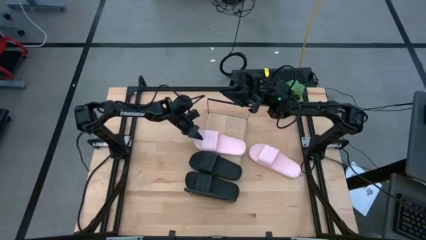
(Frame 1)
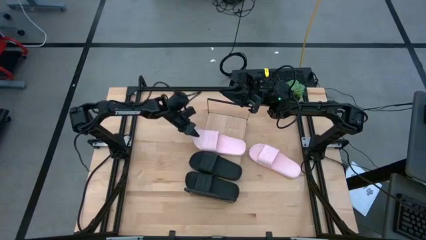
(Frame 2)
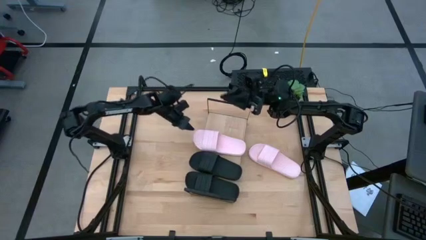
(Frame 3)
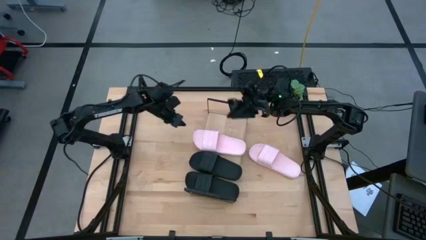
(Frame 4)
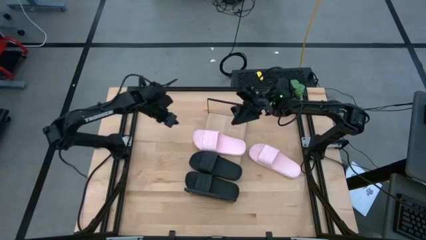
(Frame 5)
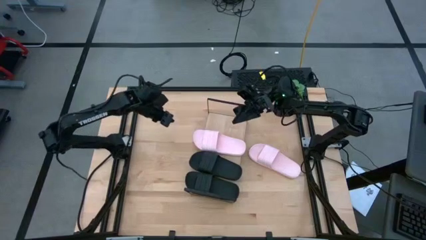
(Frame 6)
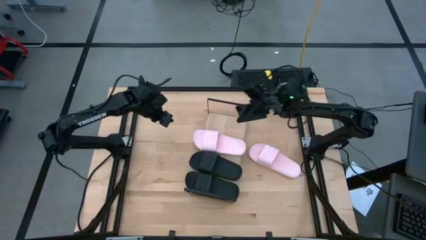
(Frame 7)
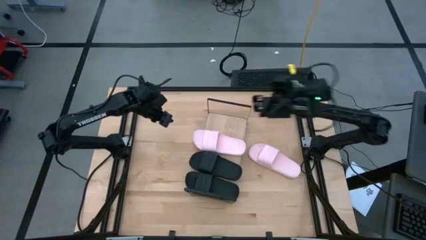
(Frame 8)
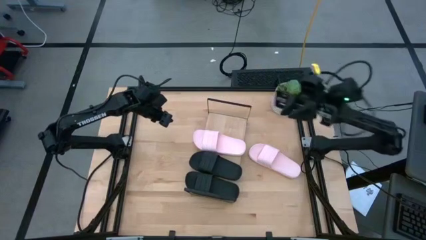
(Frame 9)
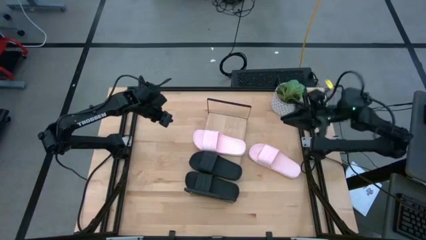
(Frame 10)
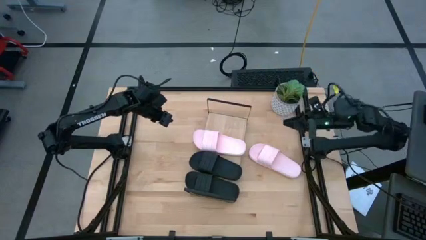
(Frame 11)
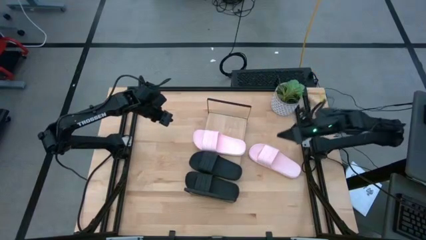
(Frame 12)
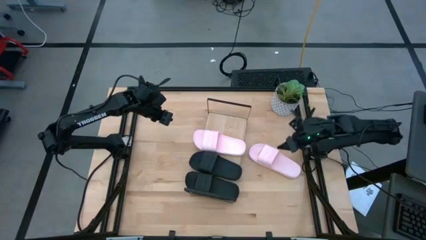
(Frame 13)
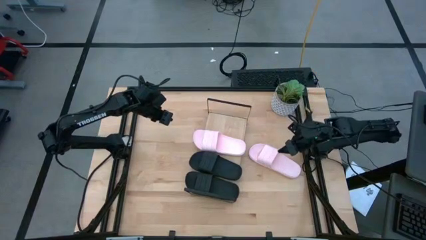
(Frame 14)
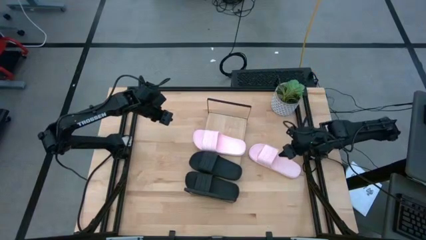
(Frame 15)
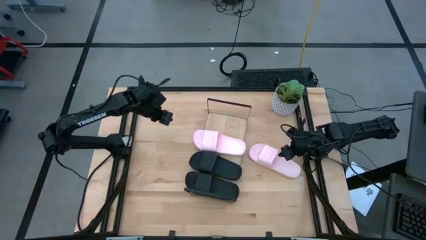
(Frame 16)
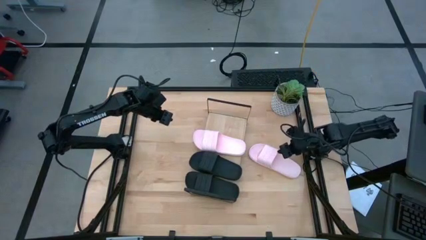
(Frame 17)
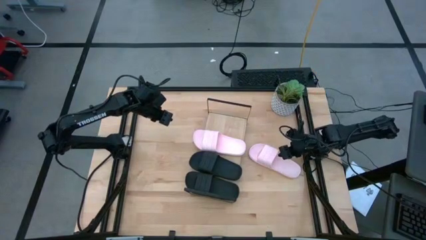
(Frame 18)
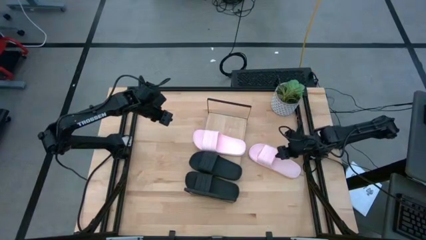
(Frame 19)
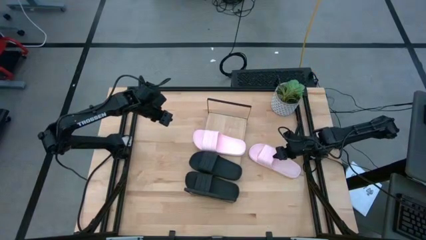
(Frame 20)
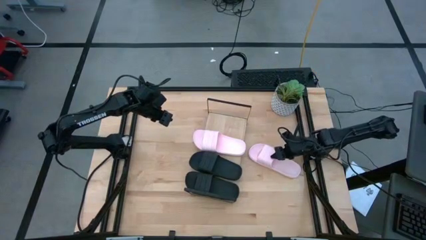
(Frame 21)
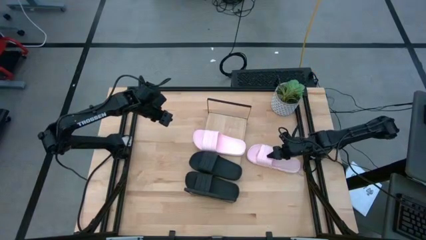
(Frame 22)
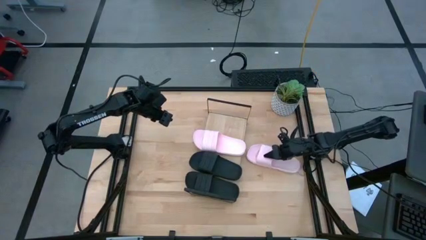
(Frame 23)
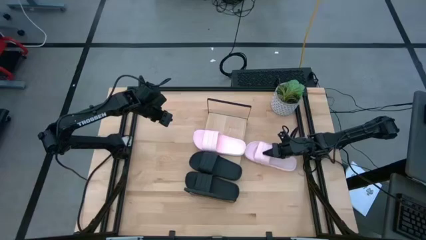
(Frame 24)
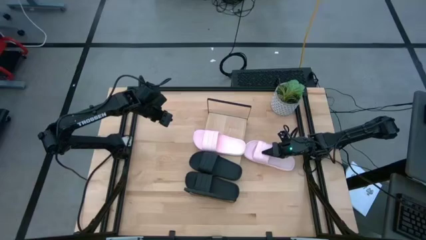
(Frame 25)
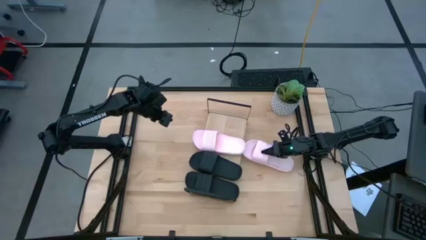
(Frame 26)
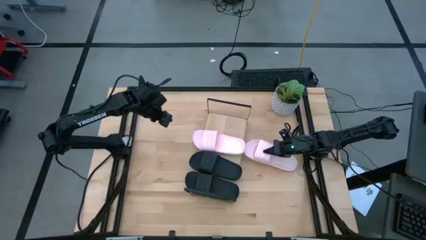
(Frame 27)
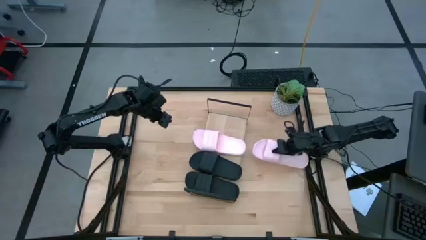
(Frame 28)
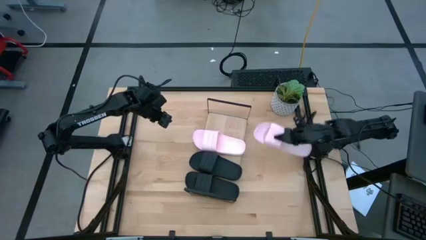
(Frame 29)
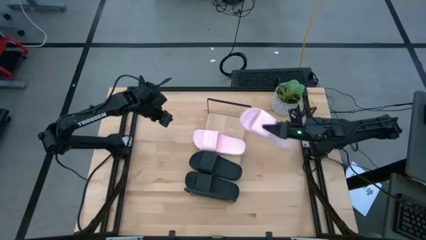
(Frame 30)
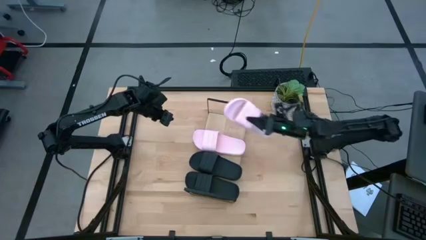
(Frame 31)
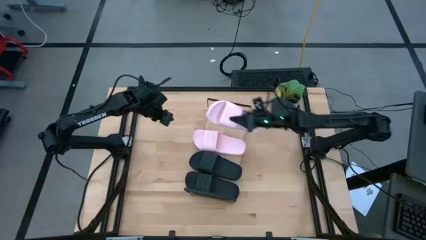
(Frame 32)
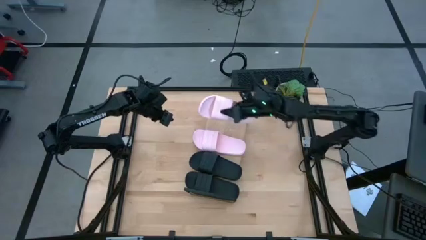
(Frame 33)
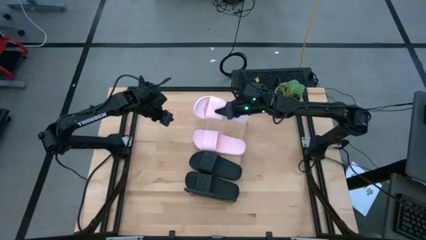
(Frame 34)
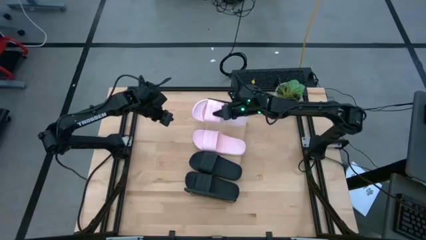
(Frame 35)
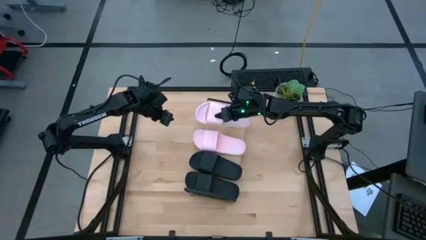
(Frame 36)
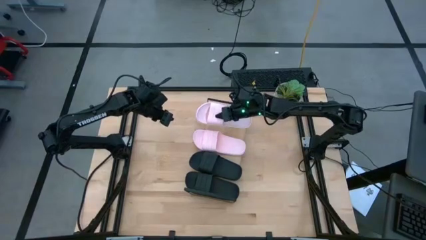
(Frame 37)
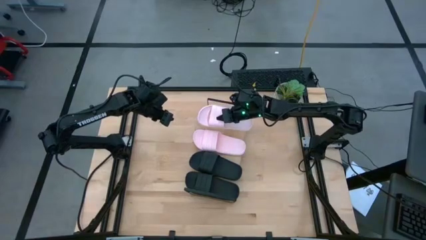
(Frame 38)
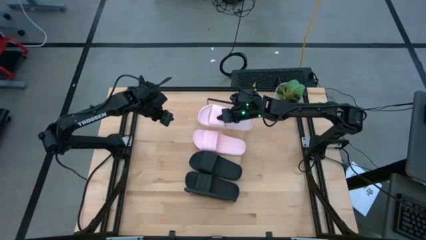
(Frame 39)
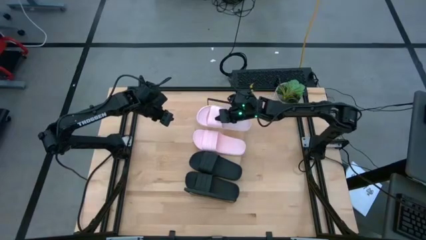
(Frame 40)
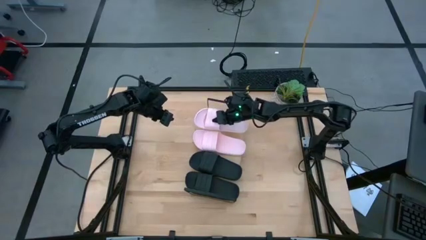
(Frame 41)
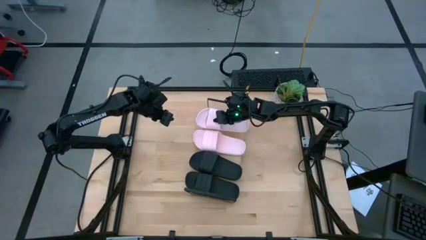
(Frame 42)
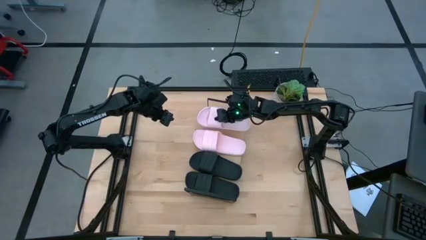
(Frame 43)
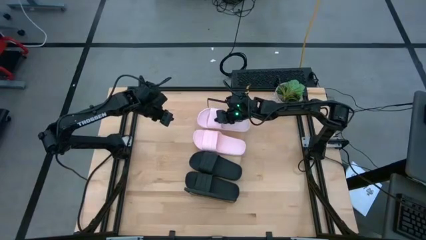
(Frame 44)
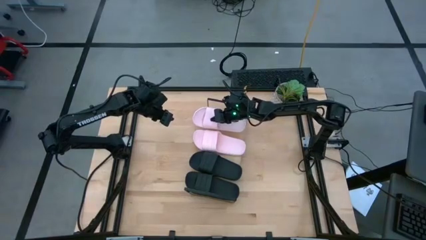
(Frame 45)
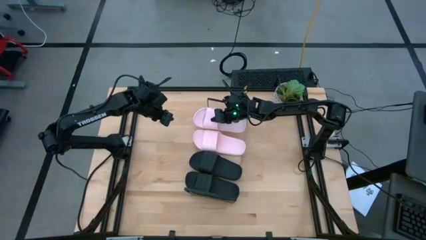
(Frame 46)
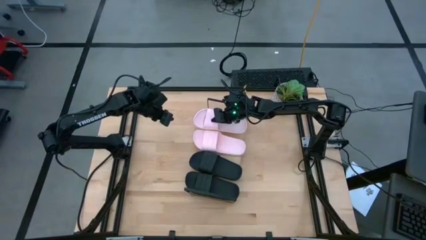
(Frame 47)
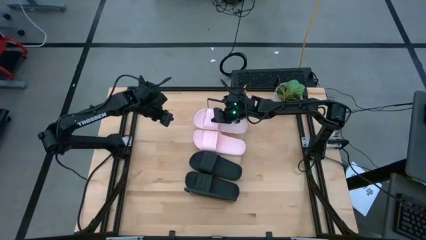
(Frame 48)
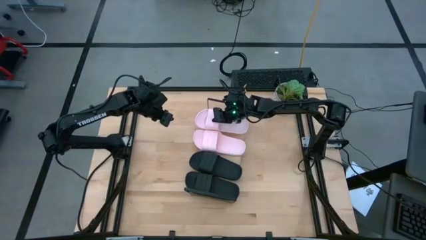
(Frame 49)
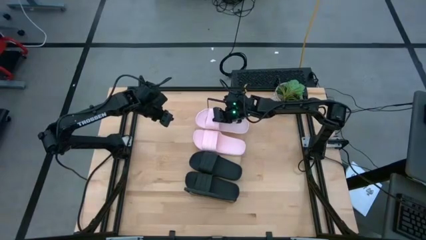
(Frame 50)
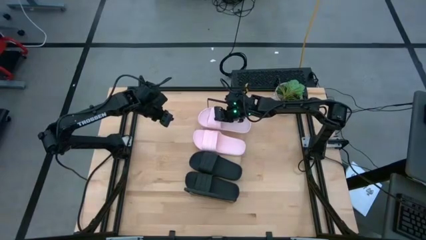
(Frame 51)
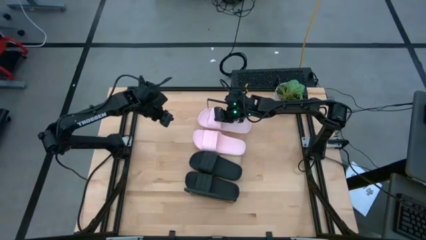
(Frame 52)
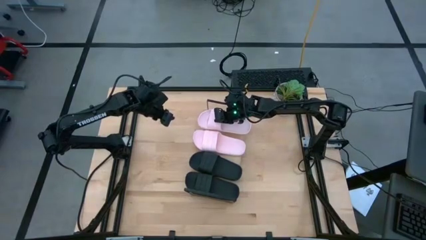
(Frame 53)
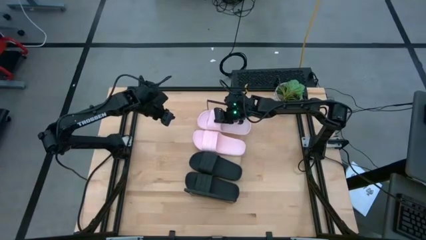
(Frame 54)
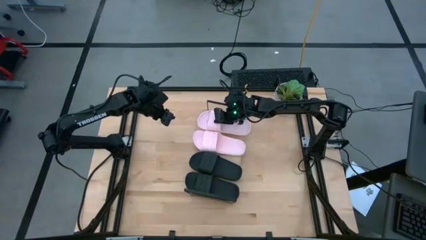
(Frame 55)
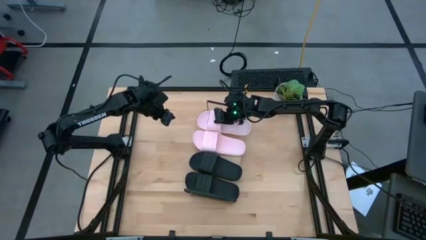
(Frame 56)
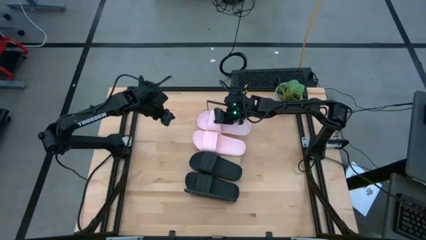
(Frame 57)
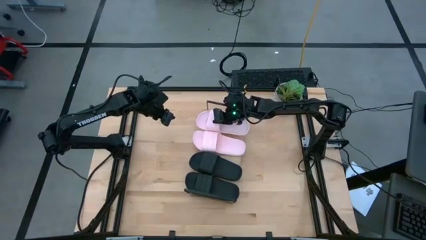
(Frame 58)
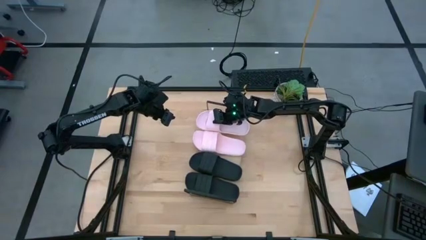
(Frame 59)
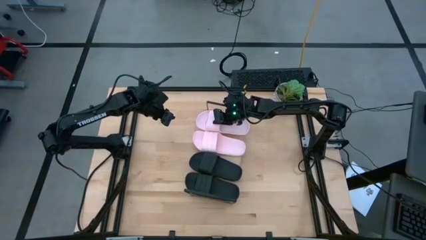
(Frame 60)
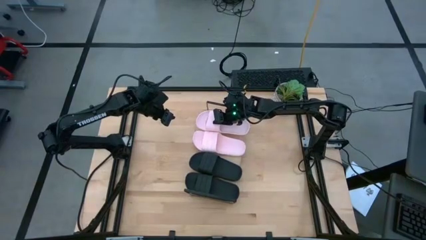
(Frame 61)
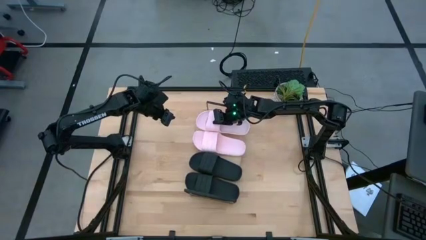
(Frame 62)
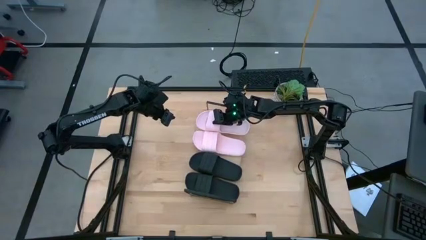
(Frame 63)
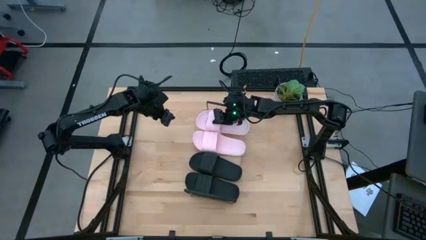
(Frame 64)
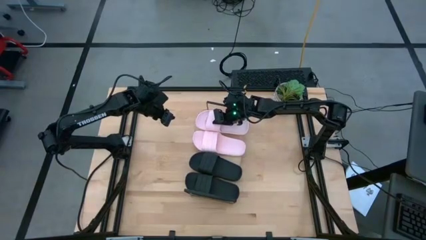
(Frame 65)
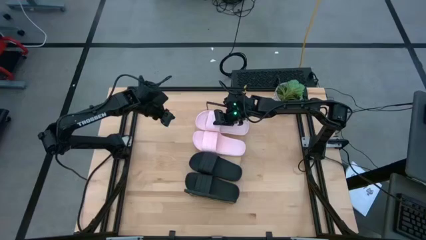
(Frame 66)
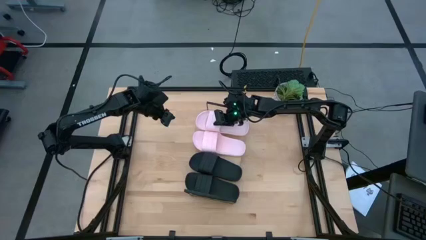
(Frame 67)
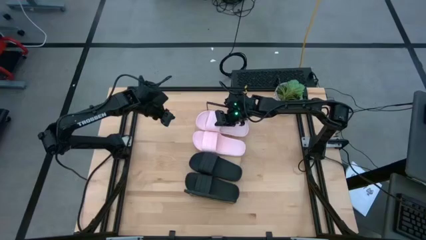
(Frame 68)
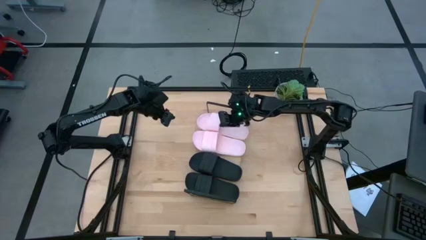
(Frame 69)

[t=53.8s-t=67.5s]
Task: Pick and place slides into the shelf
Put the pink slide on the shelf

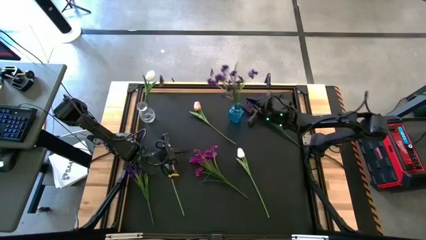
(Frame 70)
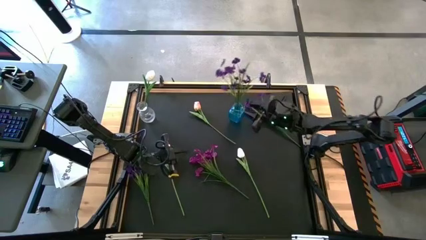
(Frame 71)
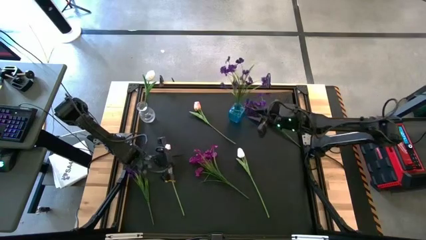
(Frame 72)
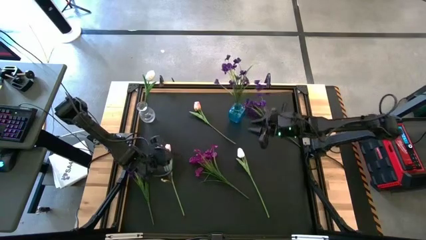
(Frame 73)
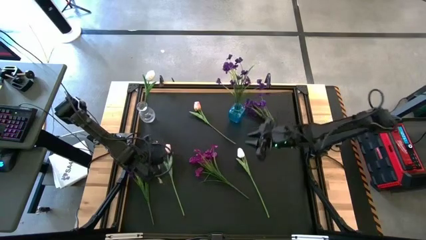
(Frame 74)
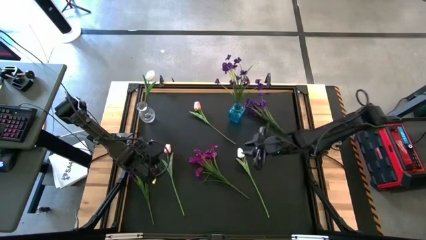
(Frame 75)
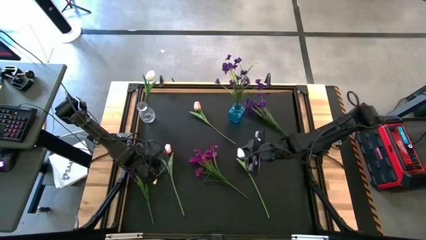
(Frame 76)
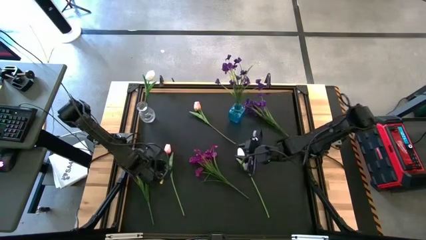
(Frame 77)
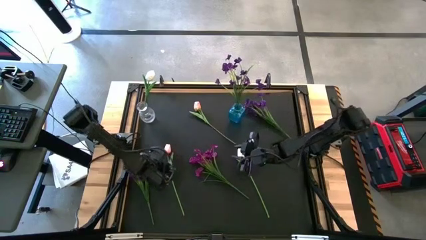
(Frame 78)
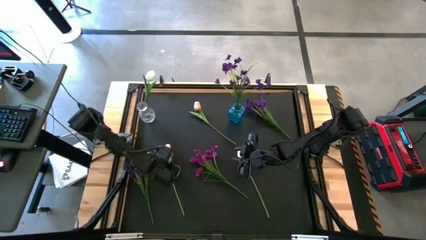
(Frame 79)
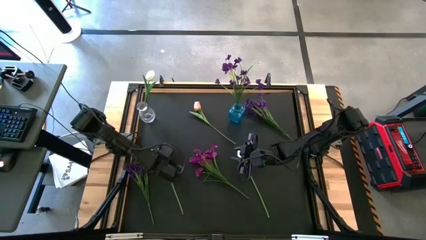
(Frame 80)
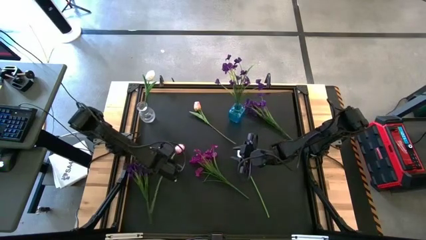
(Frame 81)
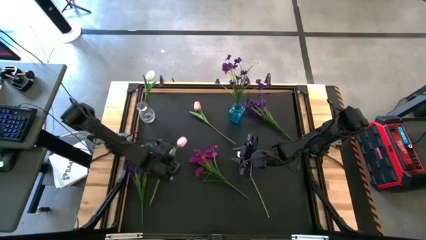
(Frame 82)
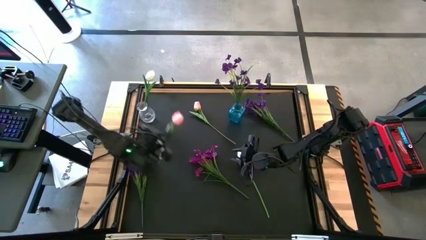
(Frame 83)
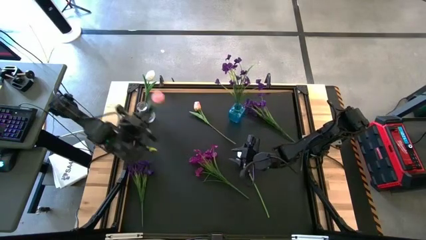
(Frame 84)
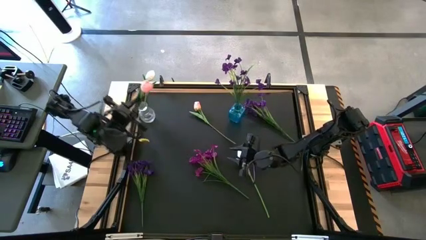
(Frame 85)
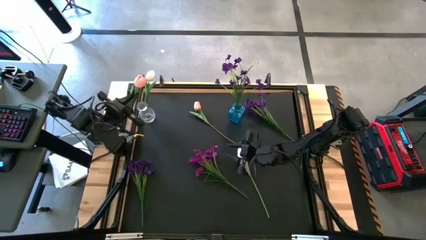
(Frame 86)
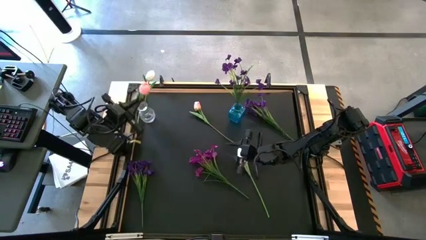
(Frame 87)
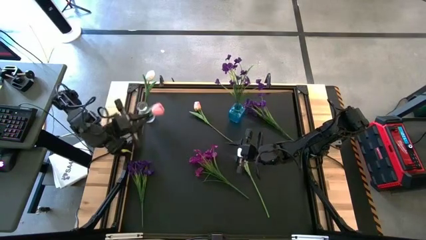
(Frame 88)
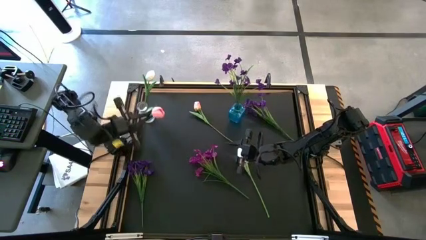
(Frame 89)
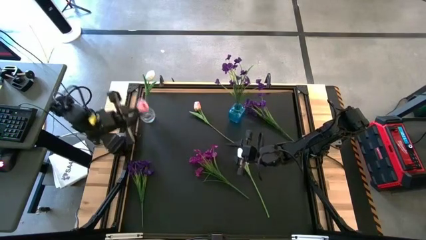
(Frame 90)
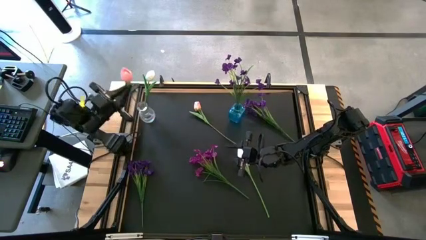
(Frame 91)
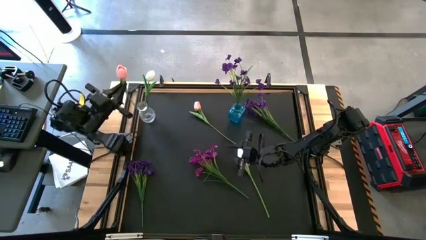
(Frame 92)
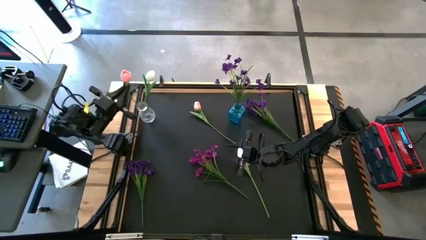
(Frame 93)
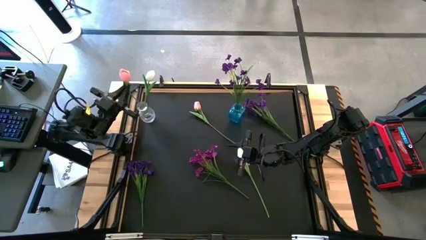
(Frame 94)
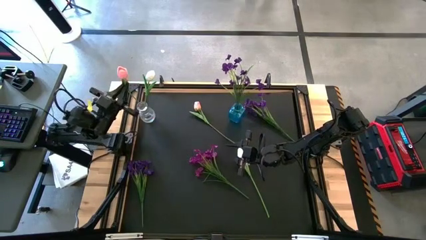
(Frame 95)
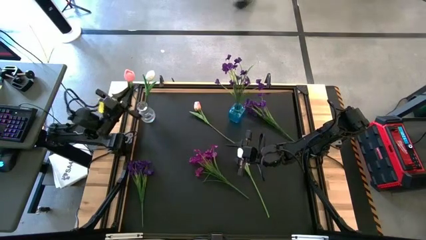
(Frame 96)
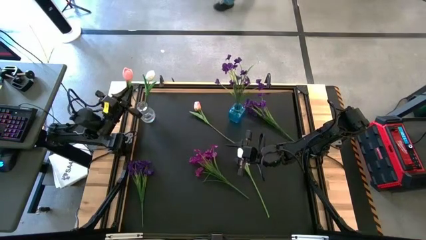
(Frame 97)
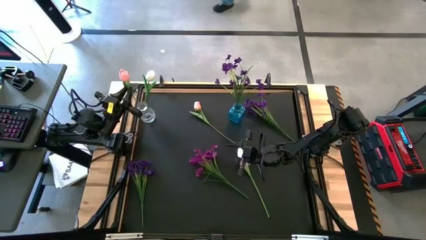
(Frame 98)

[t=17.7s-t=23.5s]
Task: Sort flowers into vase by color
Put the bottom pink flower into the transparent vase
